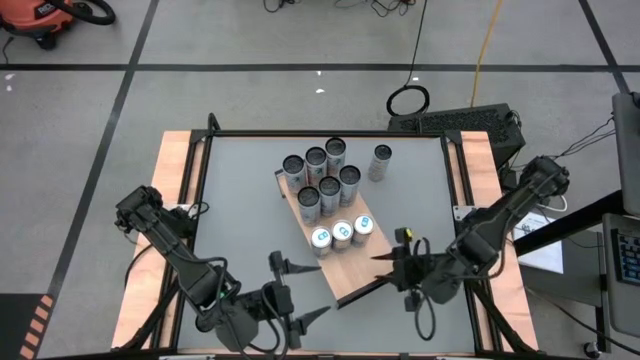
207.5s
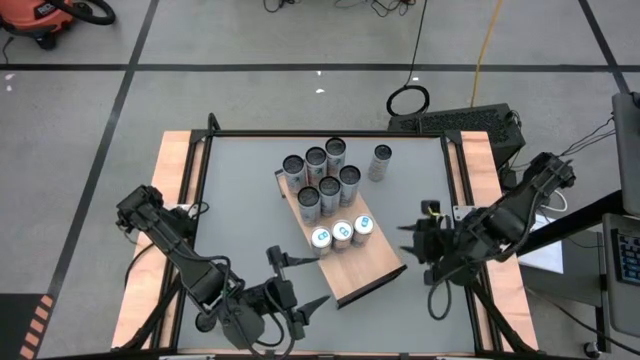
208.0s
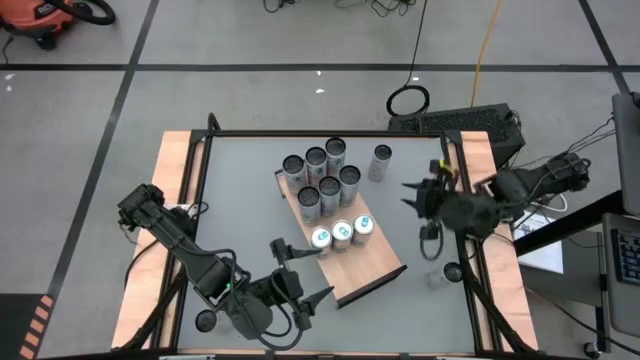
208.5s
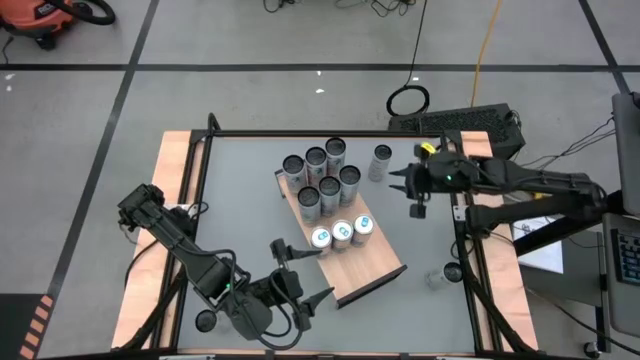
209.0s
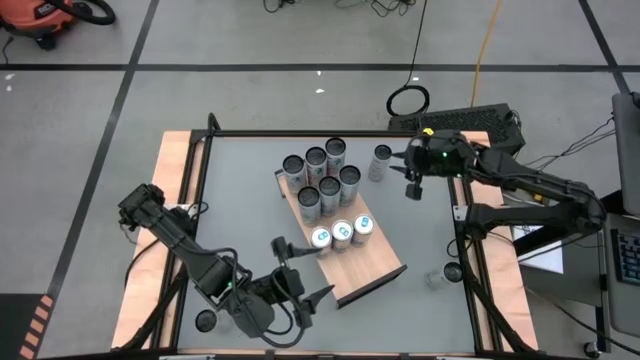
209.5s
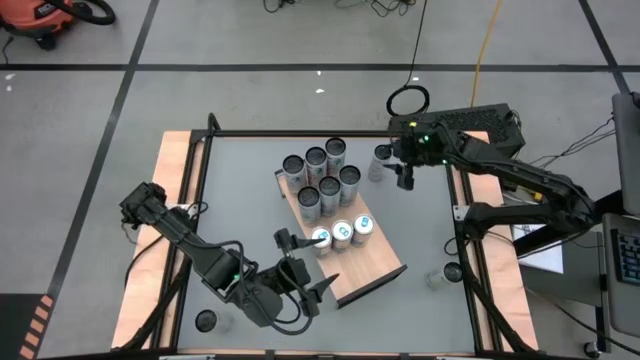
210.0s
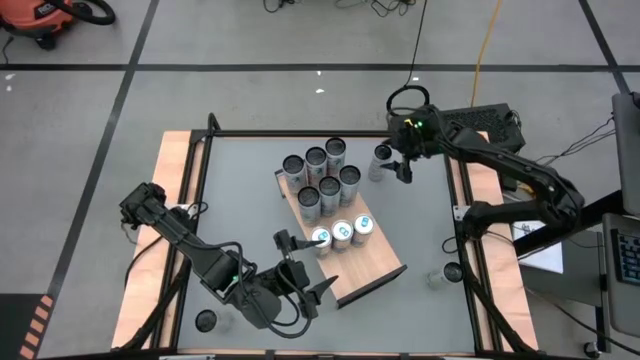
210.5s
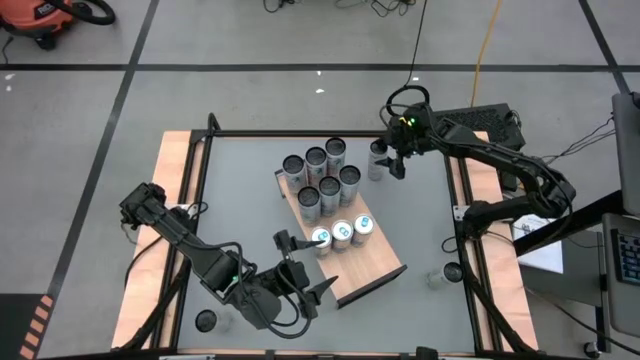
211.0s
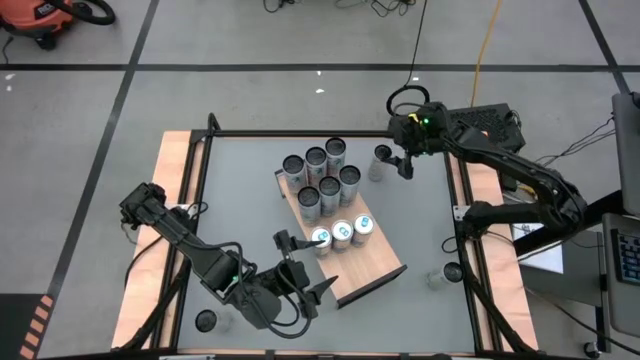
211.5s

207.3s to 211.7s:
Task: Place canned beverage on shelf
Put the top right white-yellow soda can on the shelf

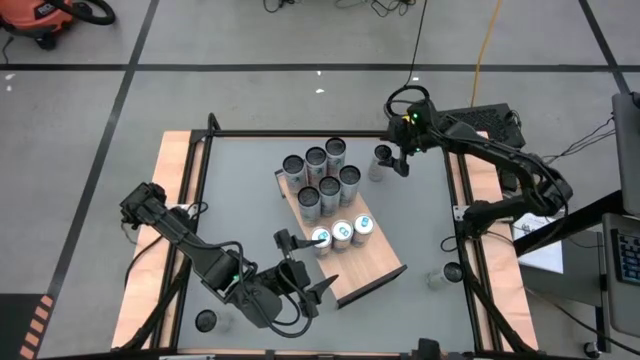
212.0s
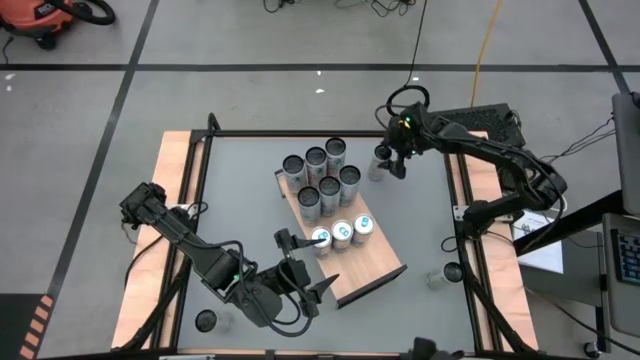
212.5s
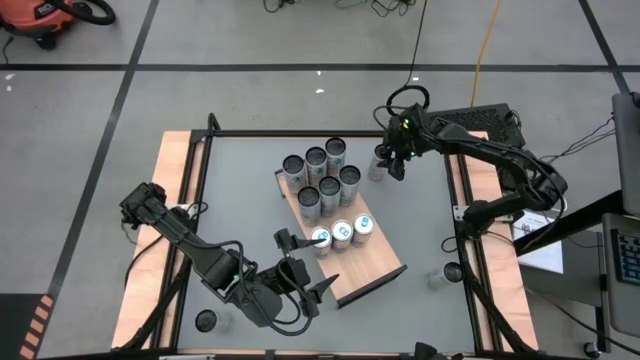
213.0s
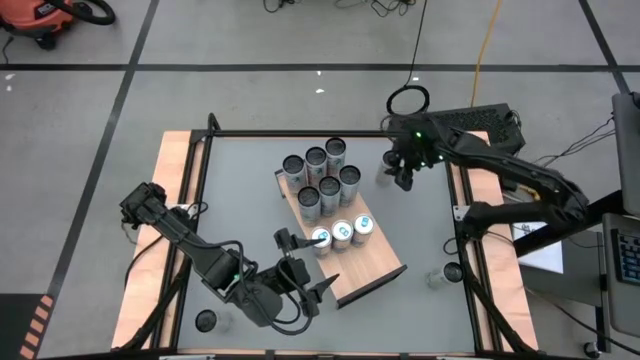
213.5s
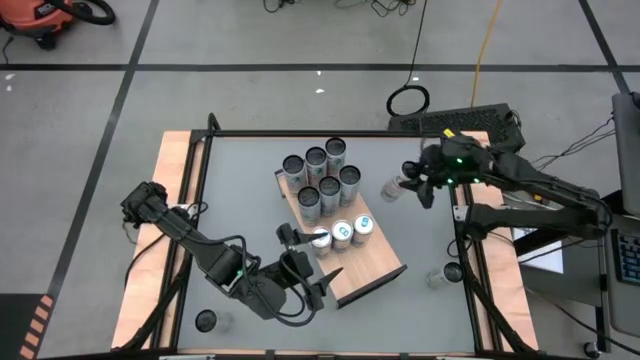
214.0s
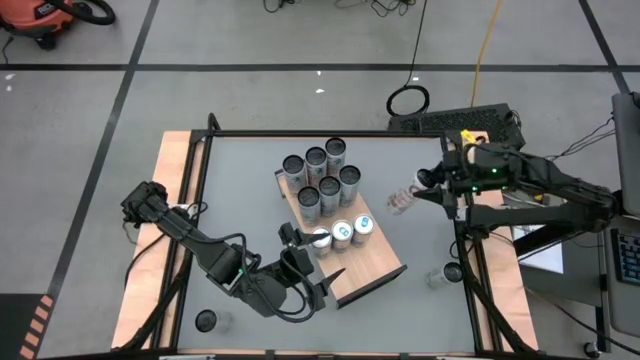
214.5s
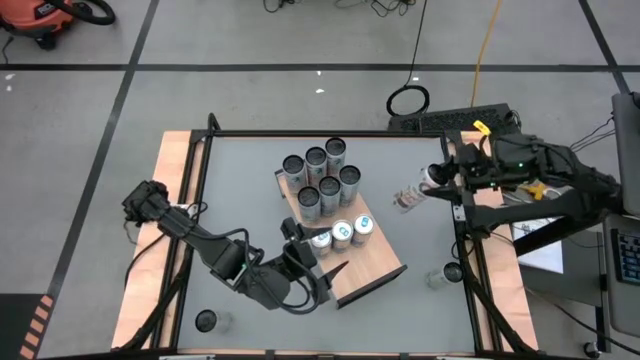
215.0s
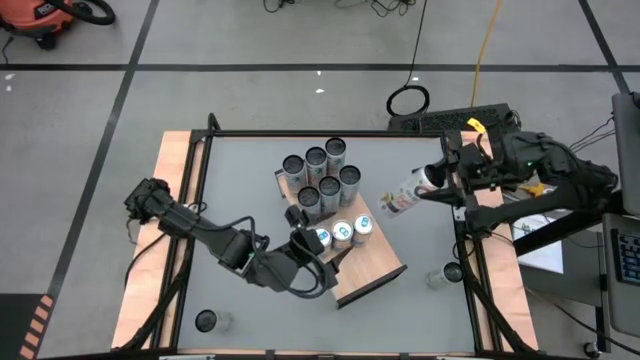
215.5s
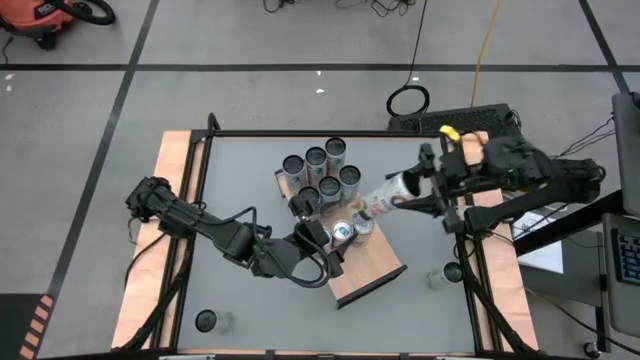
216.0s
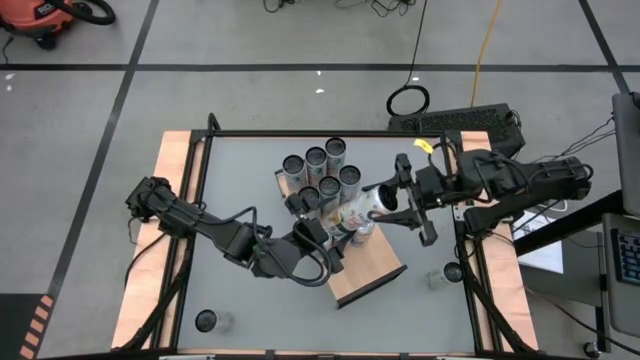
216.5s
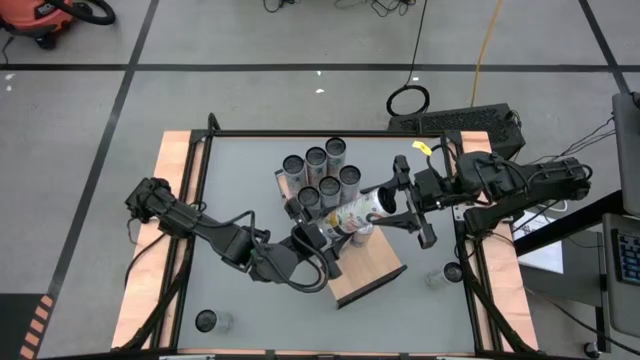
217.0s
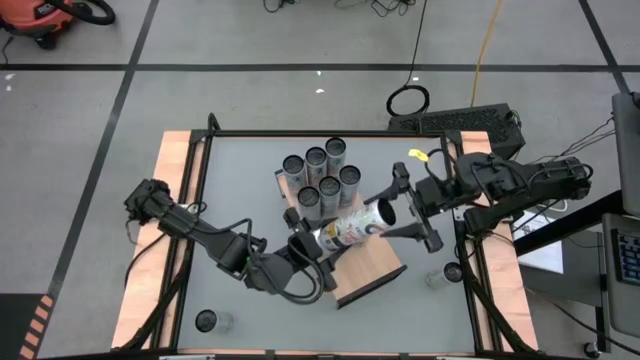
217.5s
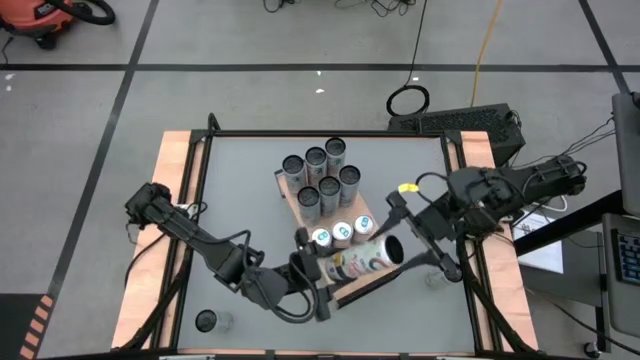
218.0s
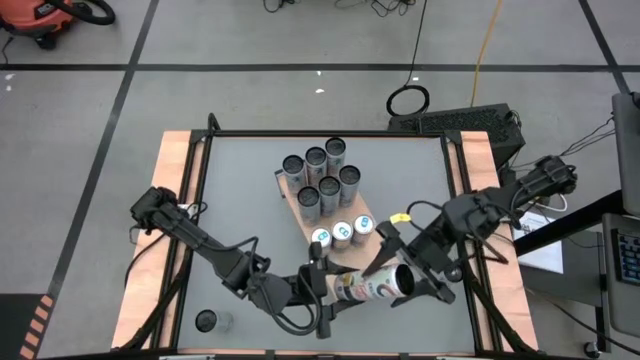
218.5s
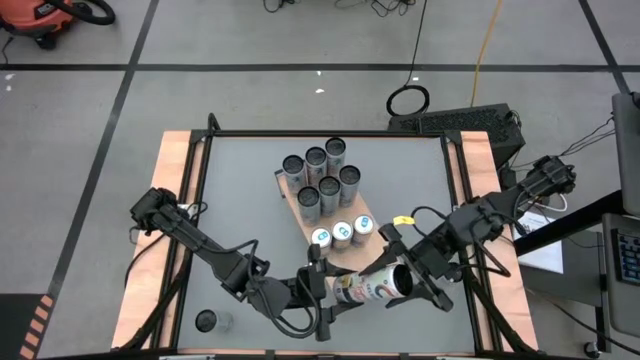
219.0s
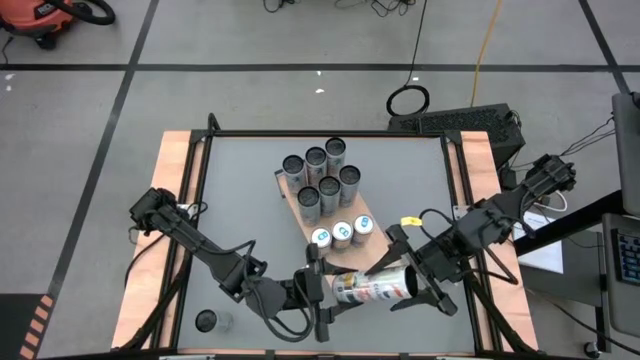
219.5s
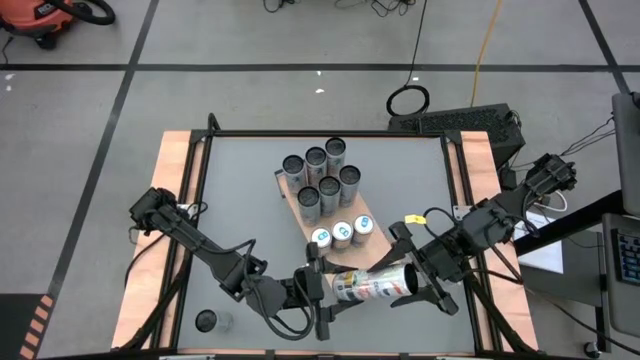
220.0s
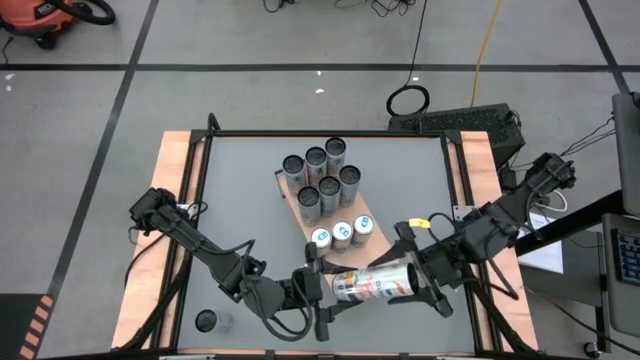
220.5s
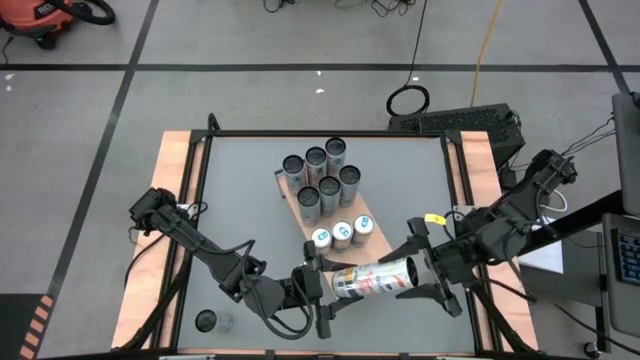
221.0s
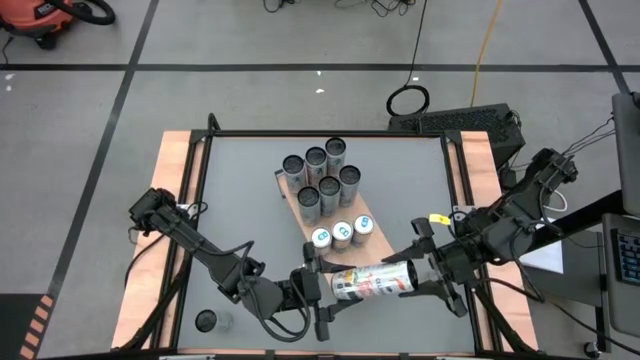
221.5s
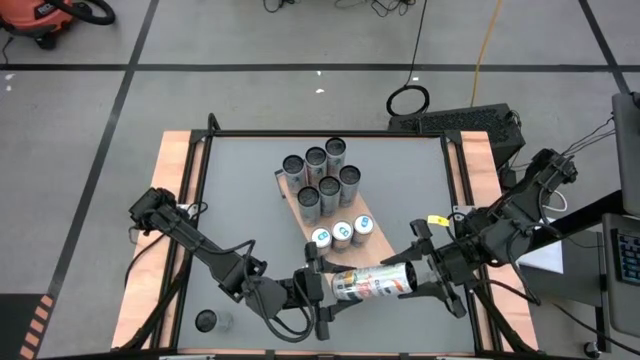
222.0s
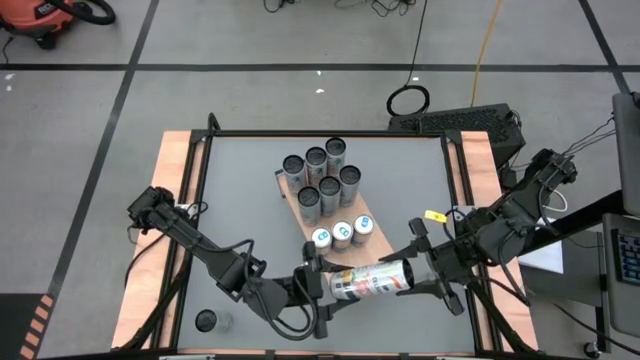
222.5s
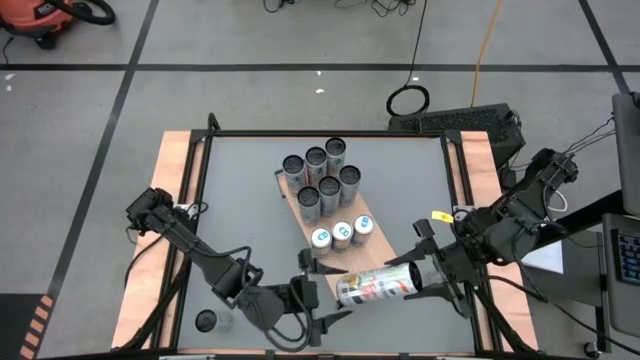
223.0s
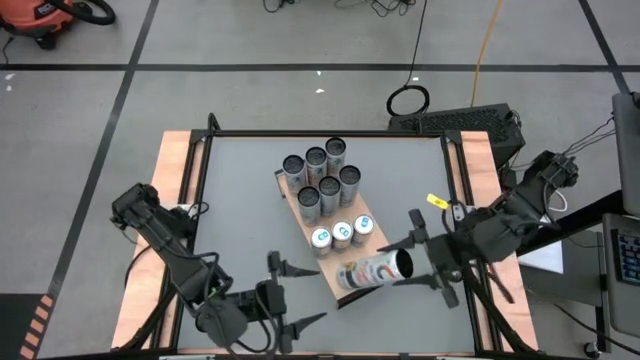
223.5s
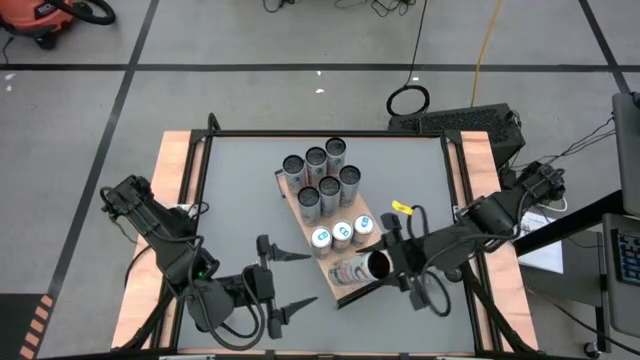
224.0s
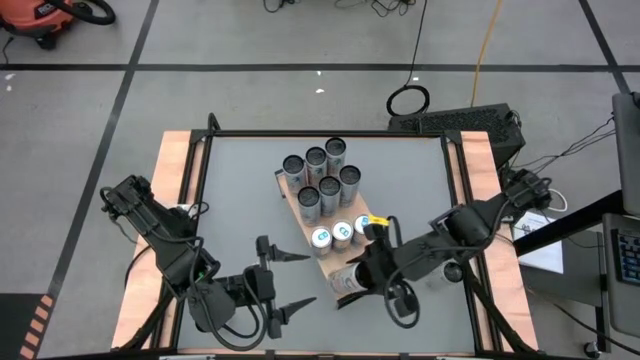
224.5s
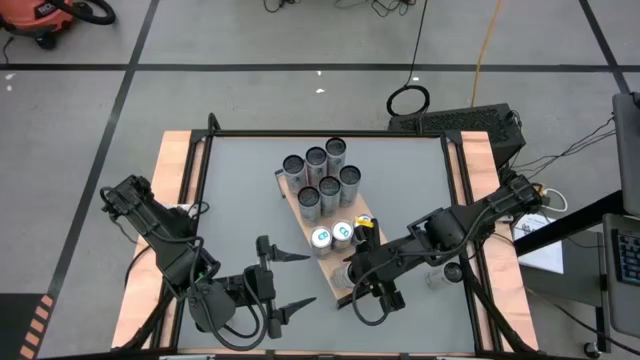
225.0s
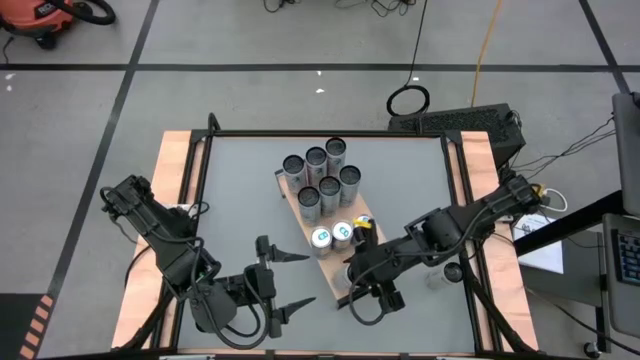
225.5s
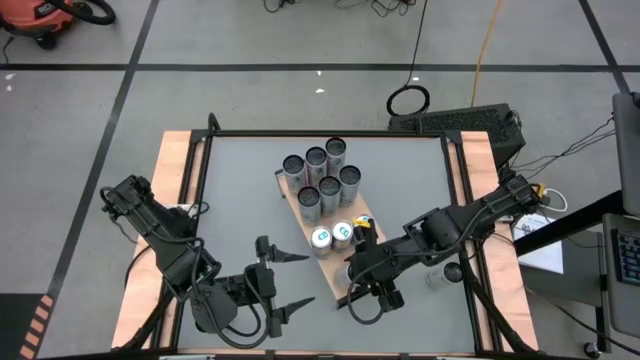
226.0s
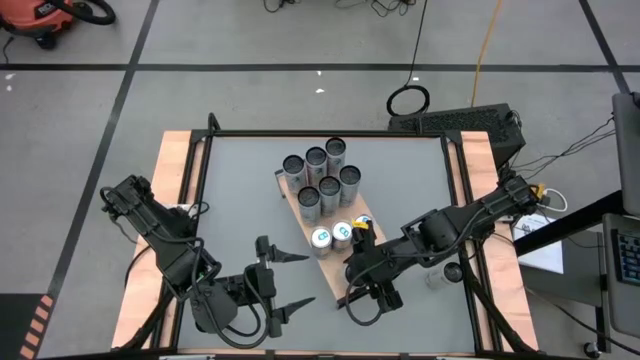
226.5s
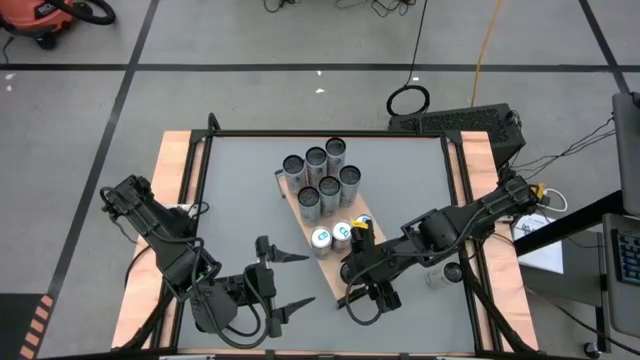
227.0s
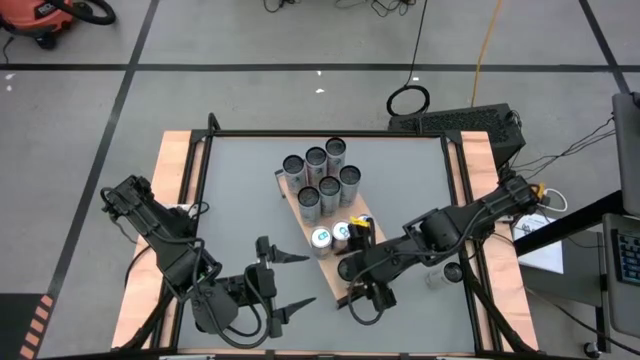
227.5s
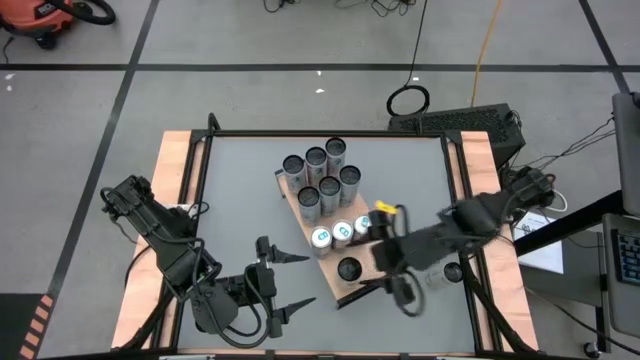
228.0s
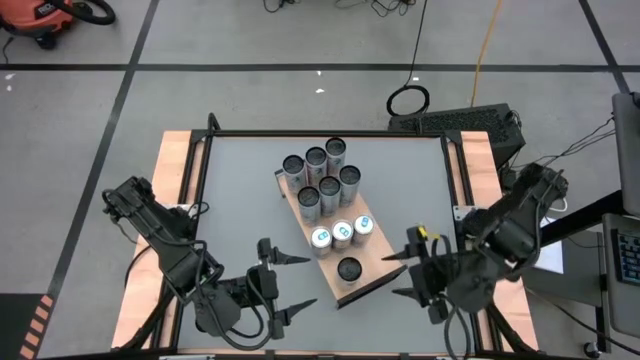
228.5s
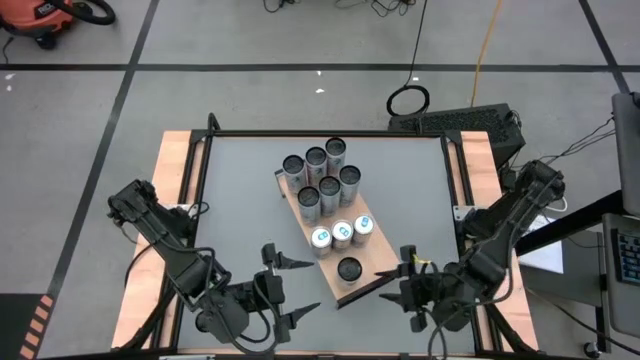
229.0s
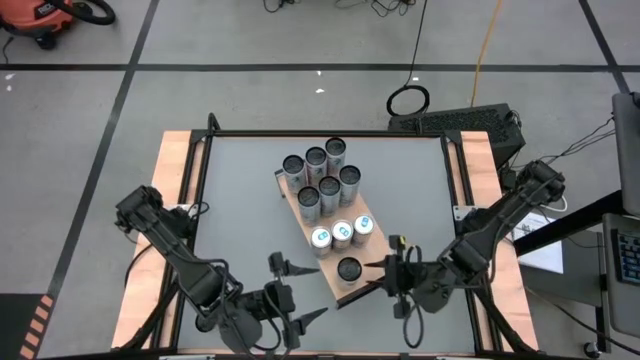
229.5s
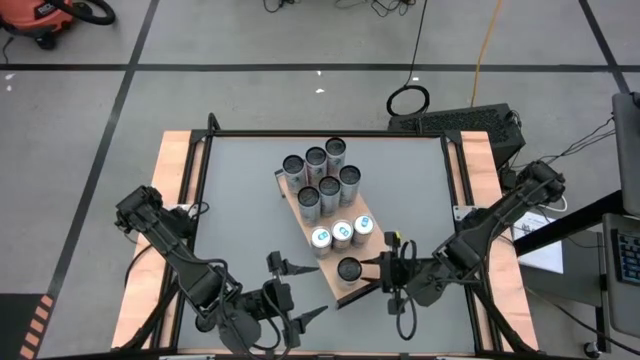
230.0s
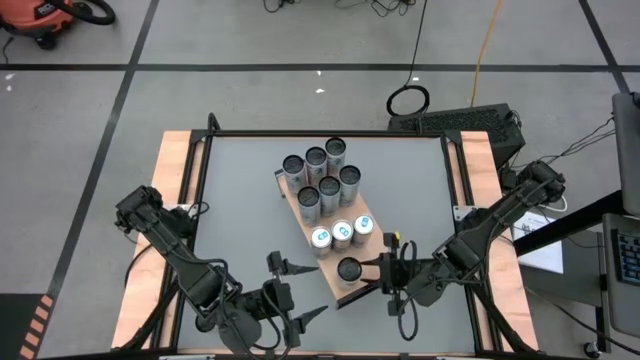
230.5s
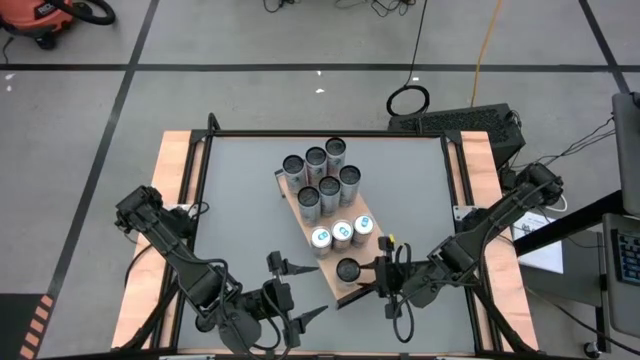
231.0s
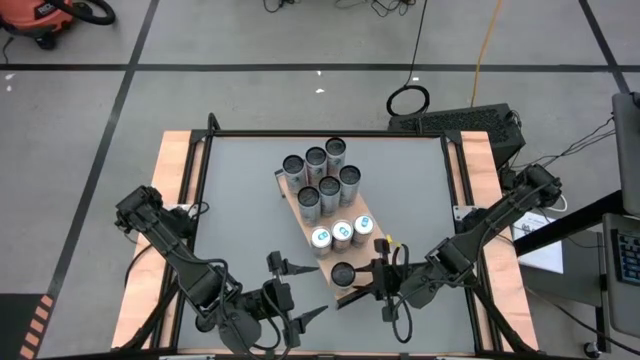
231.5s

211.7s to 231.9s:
Put the top right white-yellow soda can on the shelf
